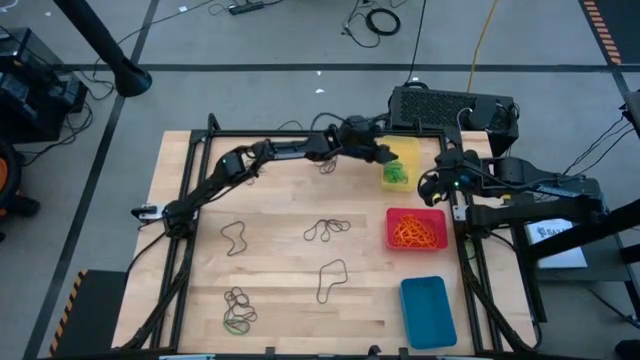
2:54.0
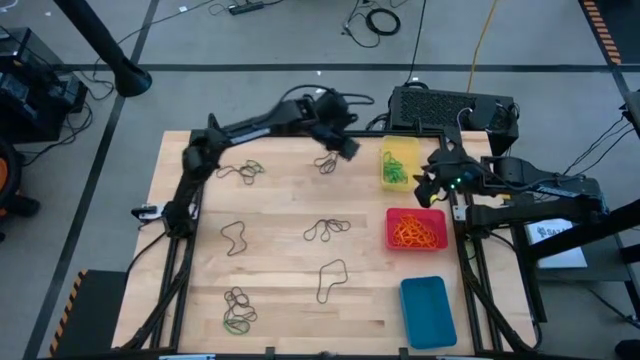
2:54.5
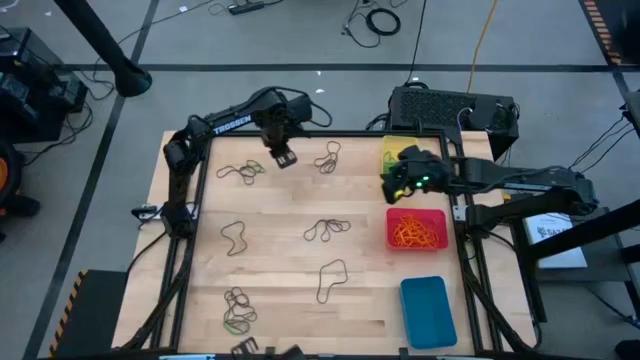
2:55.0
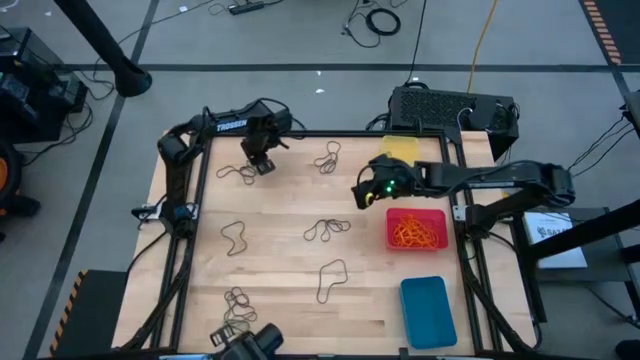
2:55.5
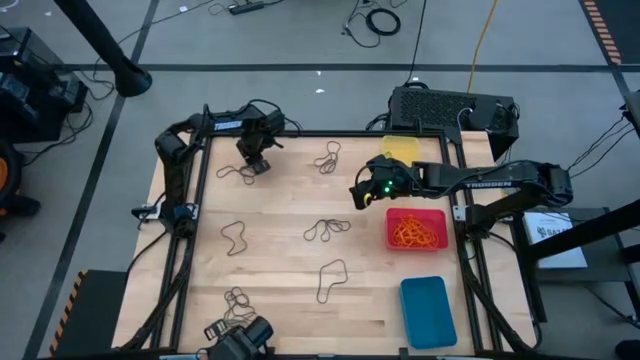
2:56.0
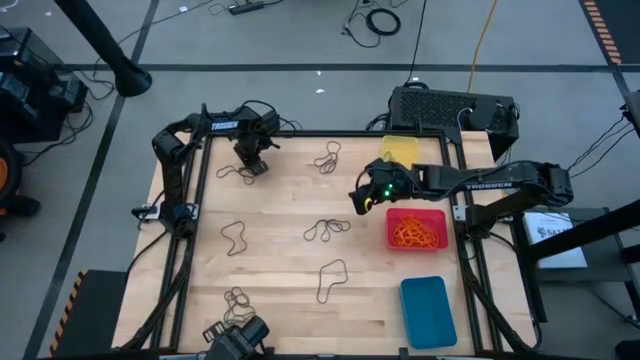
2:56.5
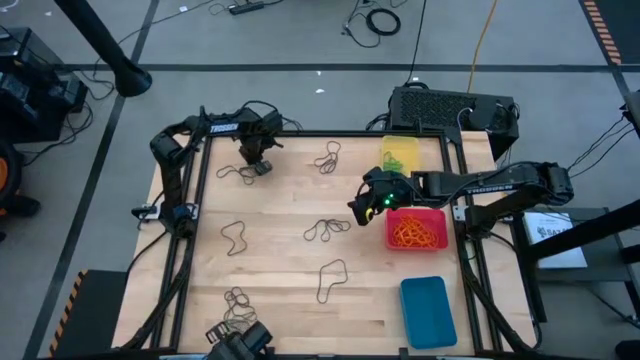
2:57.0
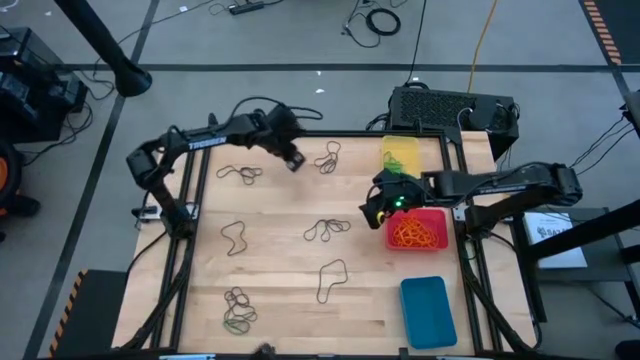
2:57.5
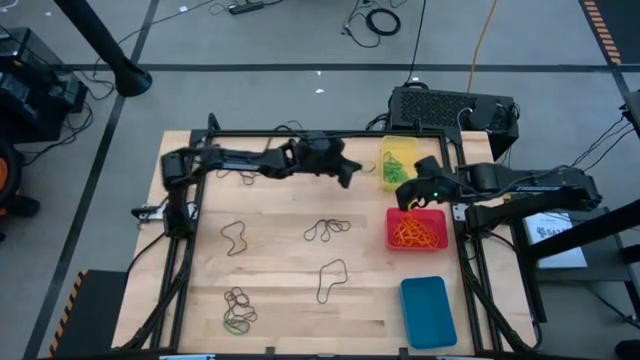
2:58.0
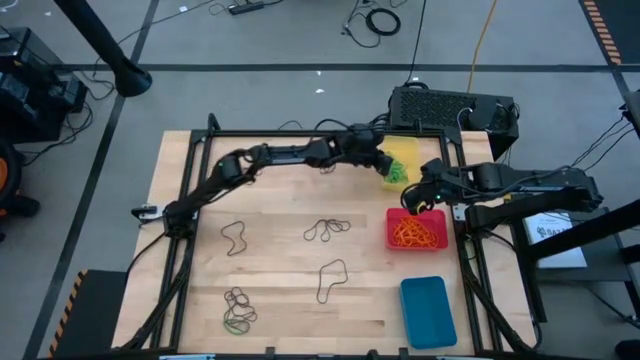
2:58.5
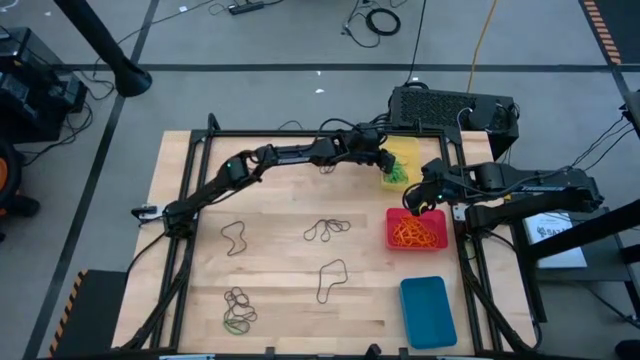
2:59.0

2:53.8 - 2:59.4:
Task: Sort rubber bands into baskets
Put the green rubber band into the yellow bin

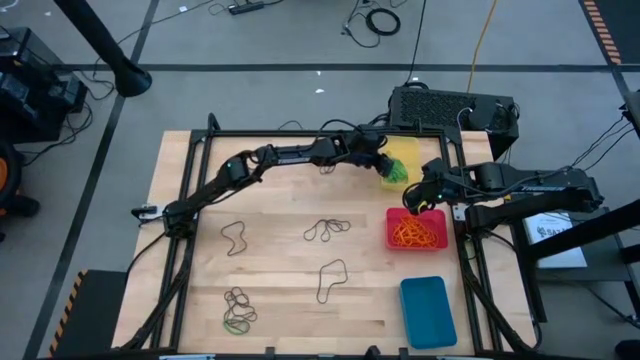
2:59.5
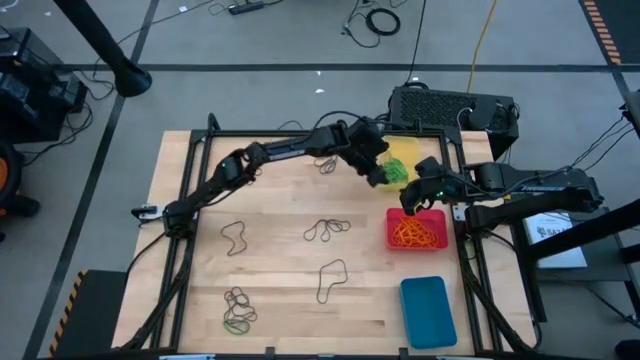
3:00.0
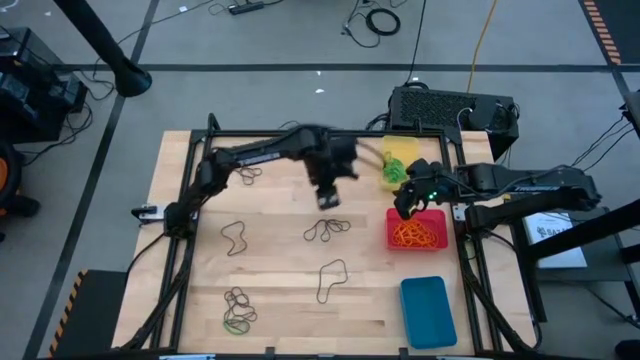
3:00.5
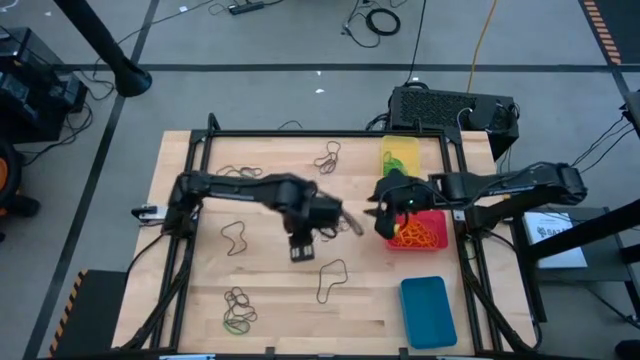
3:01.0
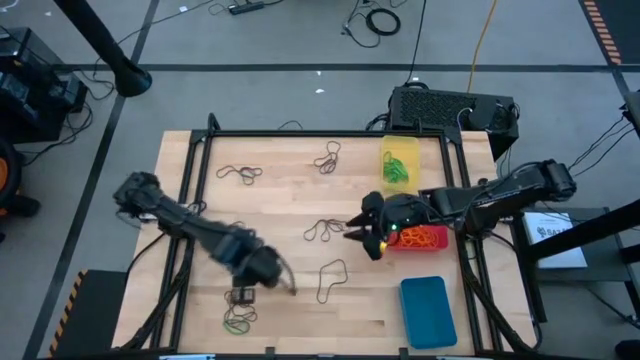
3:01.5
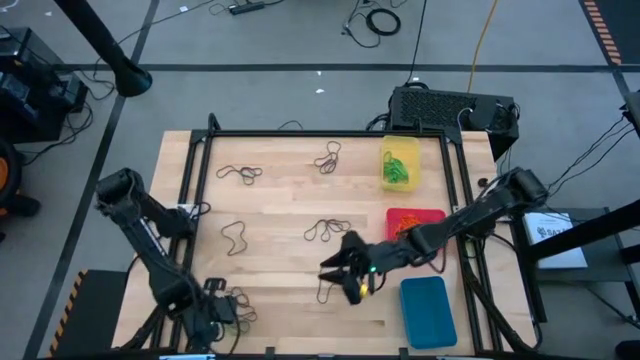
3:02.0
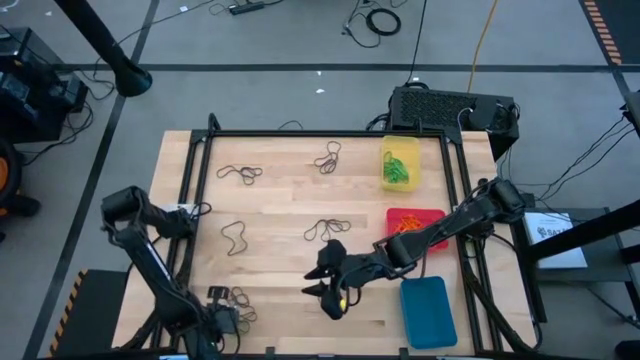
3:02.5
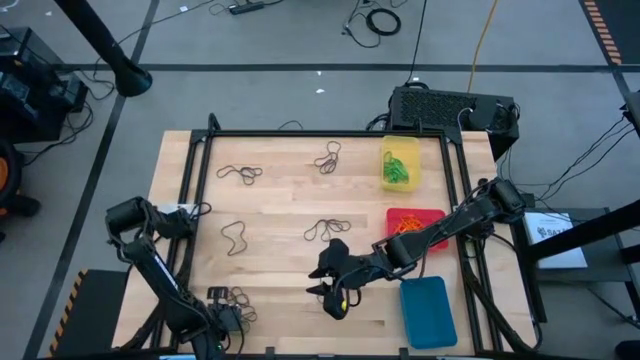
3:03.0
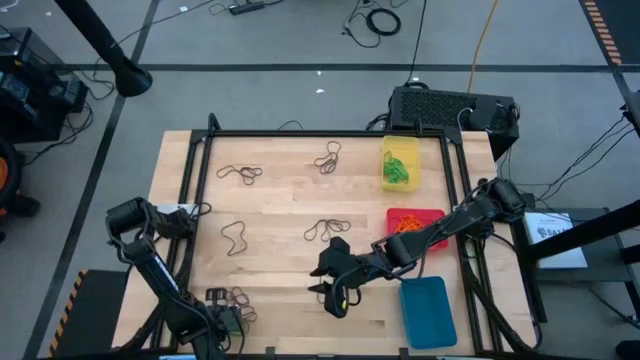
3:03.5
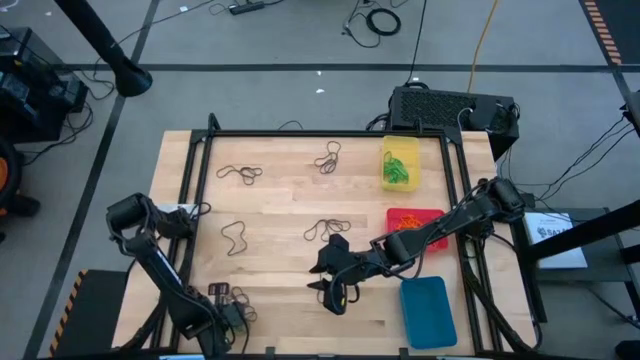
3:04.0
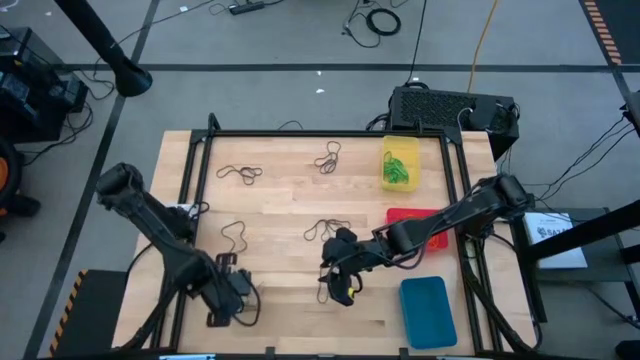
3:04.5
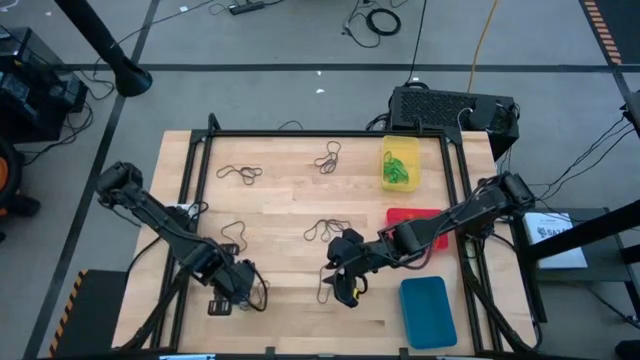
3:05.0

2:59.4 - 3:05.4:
Put the green rubber band into the yellow bin

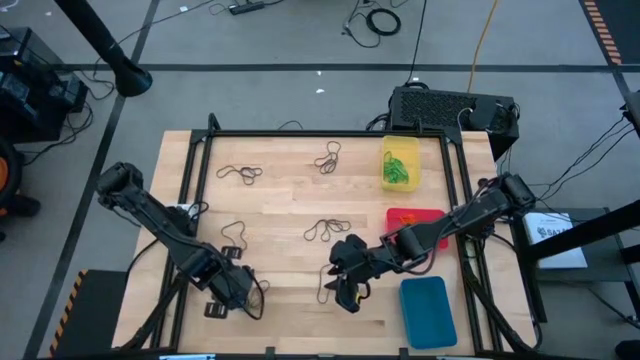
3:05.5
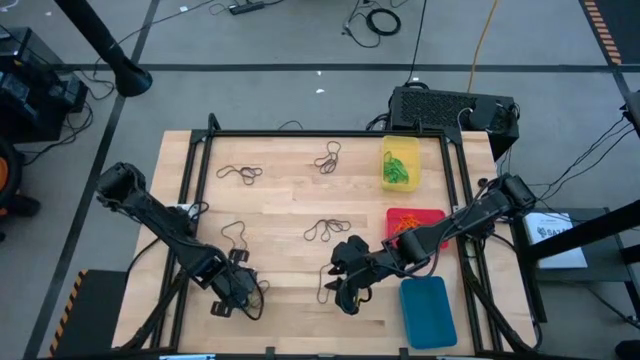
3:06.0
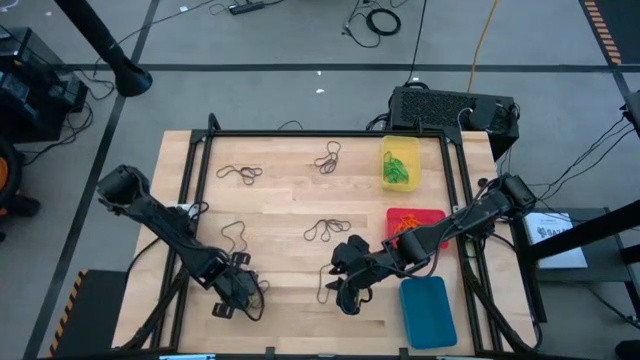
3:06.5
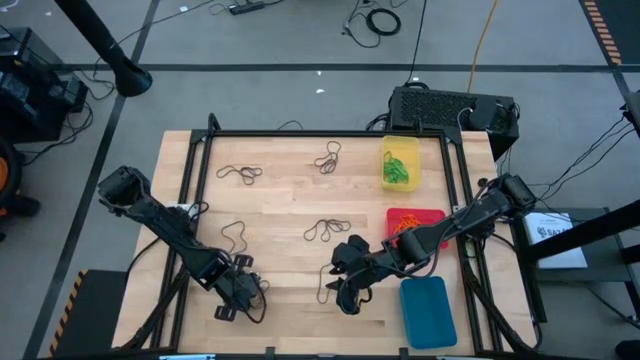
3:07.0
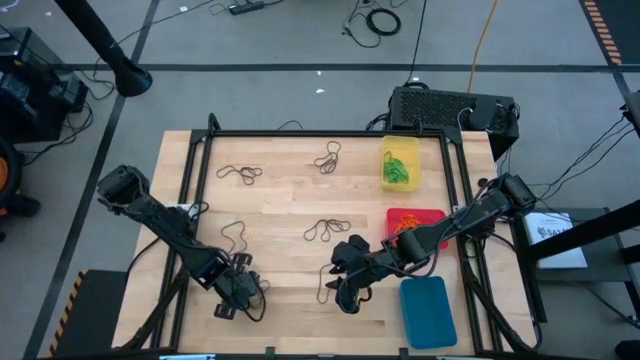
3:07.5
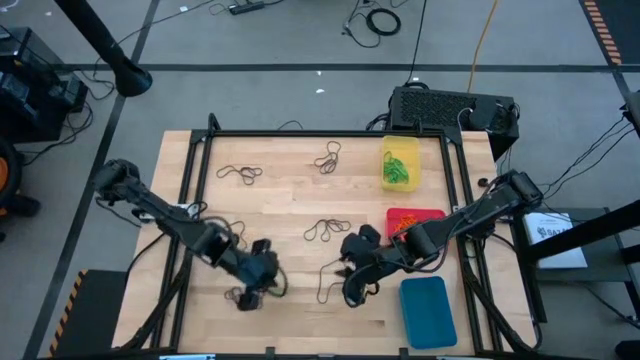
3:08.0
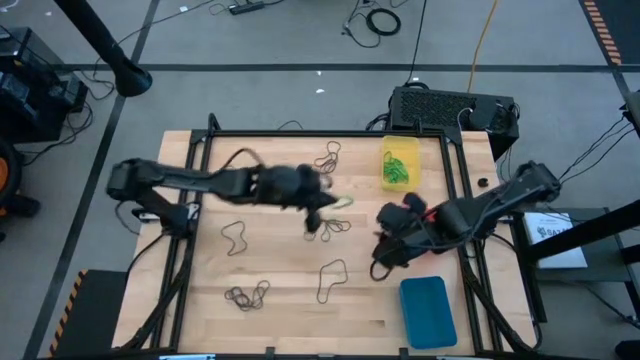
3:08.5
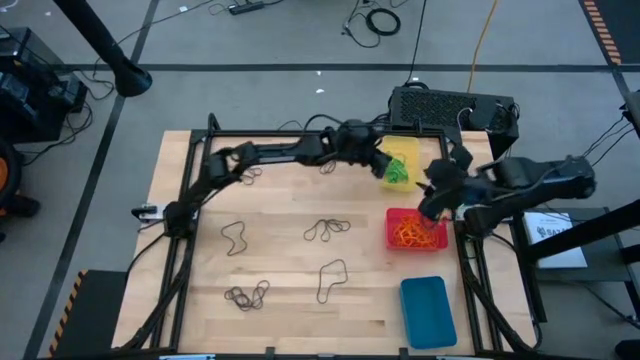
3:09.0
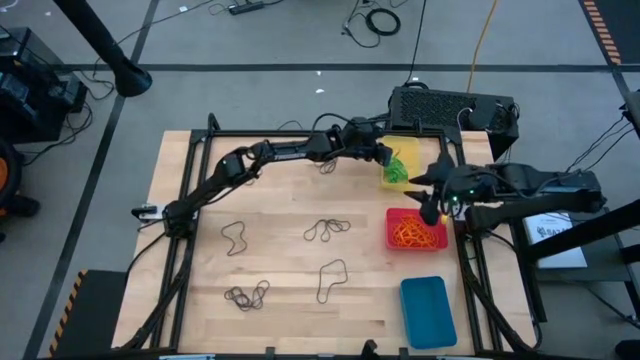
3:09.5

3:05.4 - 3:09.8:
Put the green rubber band into the yellow bin

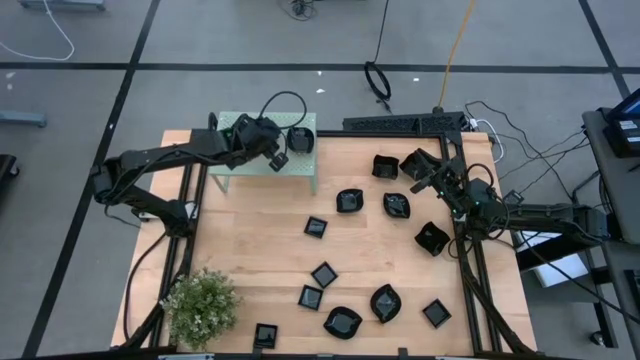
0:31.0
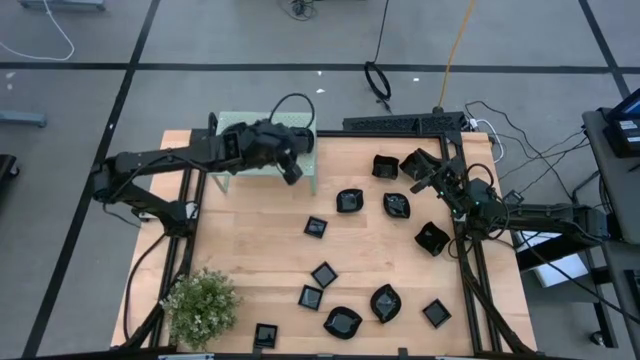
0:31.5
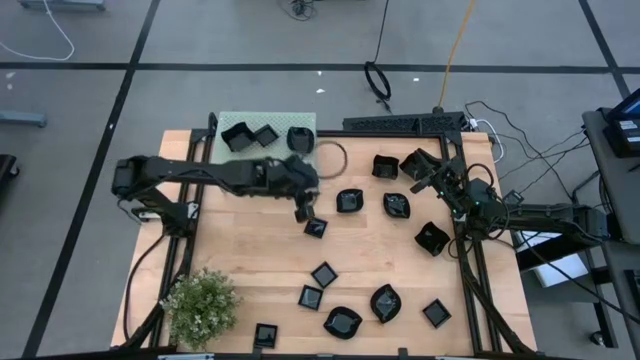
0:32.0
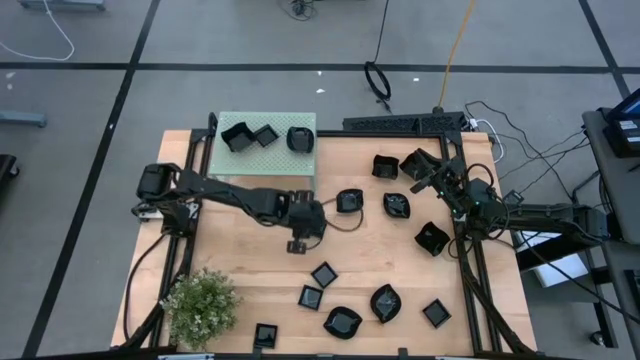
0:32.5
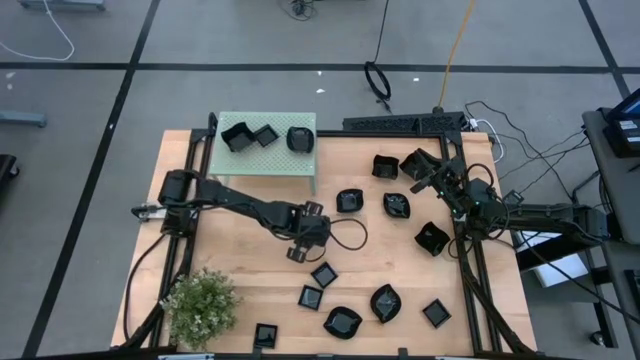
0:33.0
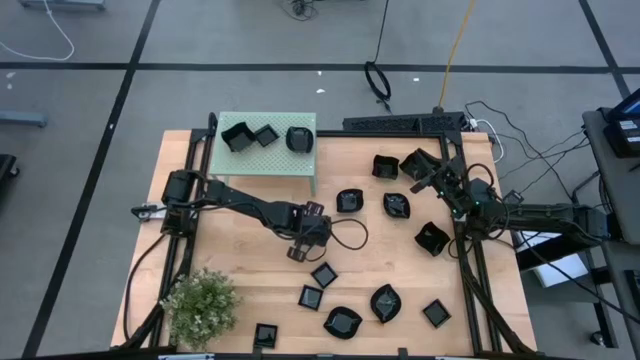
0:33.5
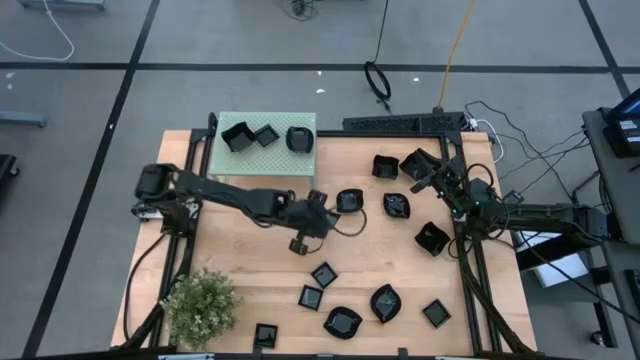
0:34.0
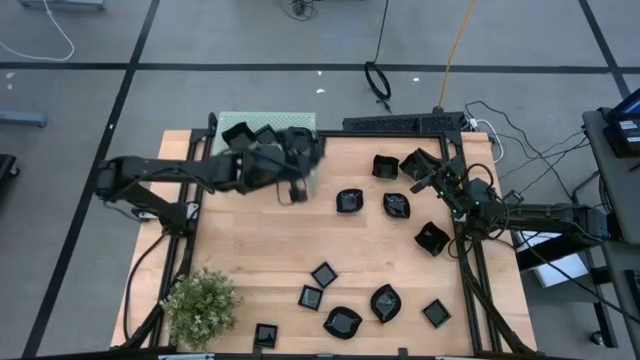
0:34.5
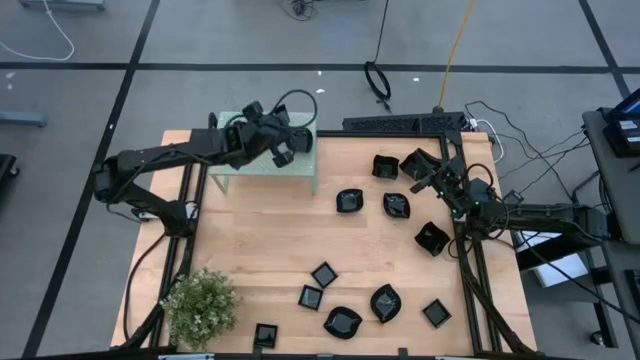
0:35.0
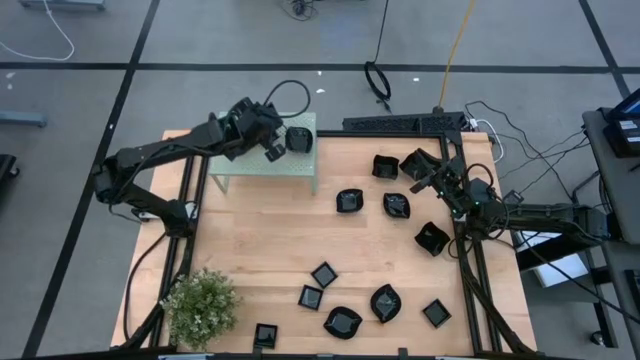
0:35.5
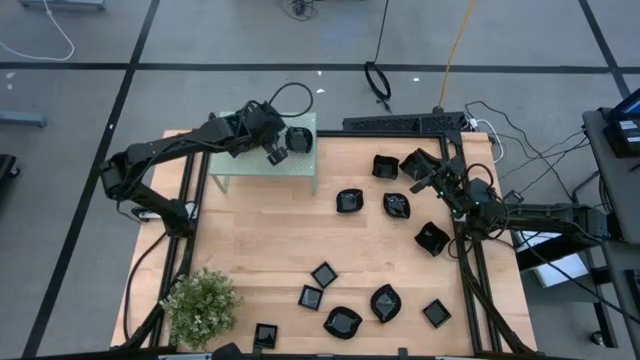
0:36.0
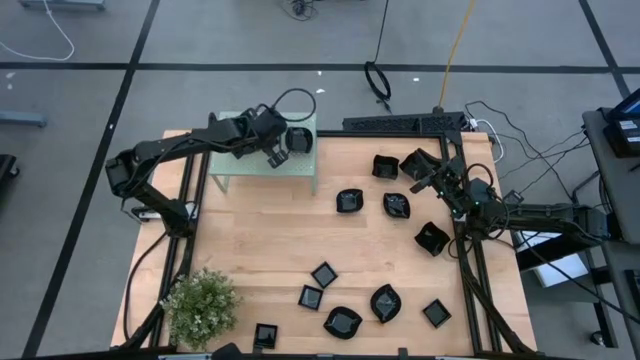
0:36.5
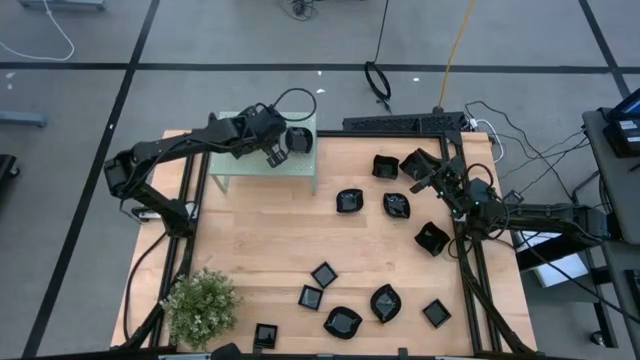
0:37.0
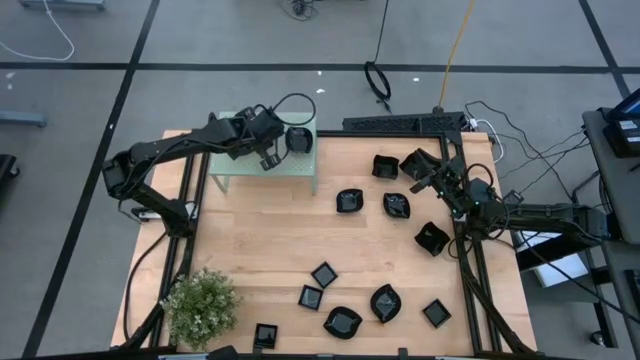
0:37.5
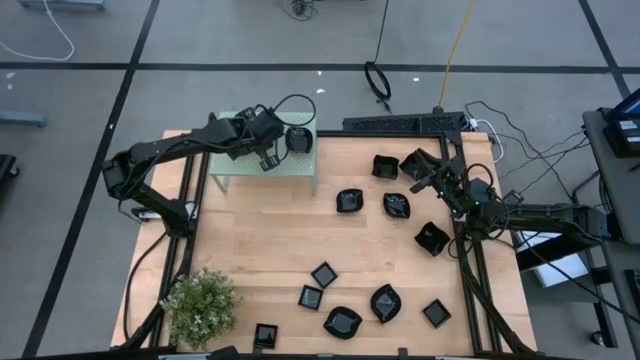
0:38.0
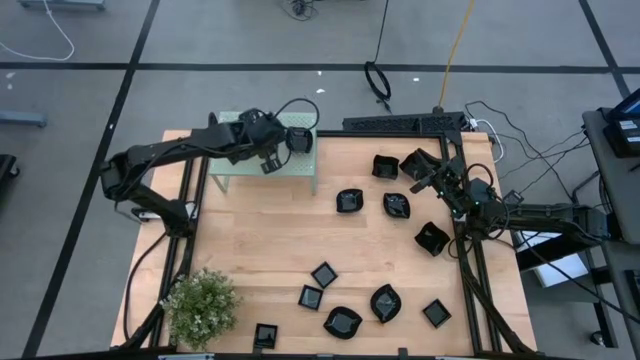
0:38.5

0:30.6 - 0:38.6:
Task: Pick & Place Mini shaped plates
Stack the square plate on top of the square plate on the shelf
